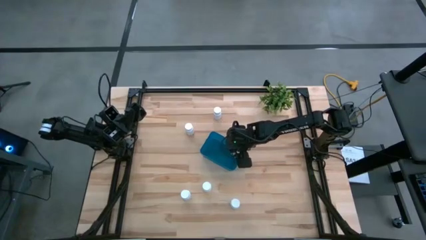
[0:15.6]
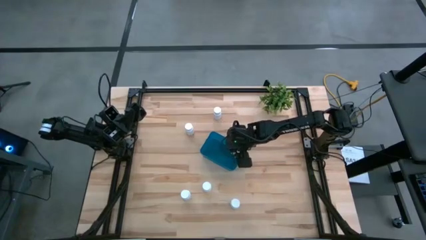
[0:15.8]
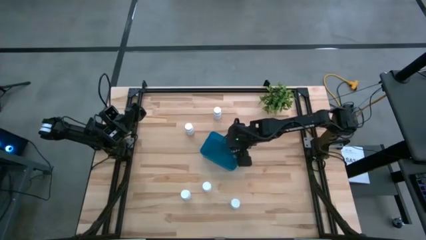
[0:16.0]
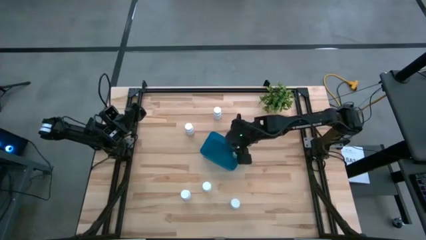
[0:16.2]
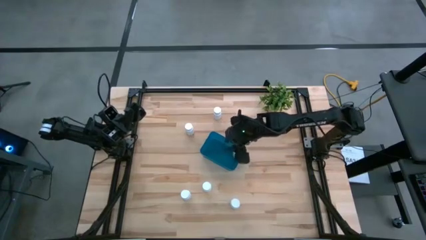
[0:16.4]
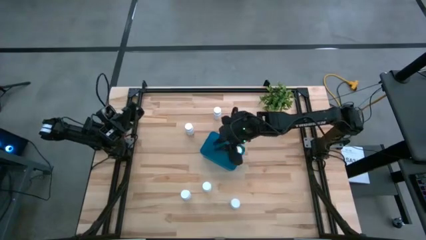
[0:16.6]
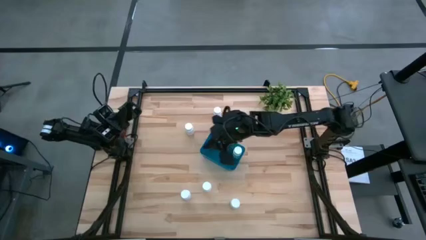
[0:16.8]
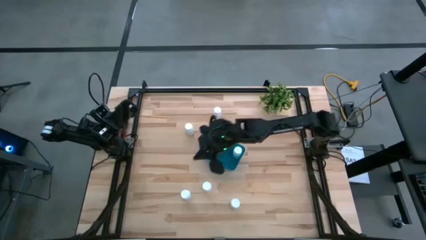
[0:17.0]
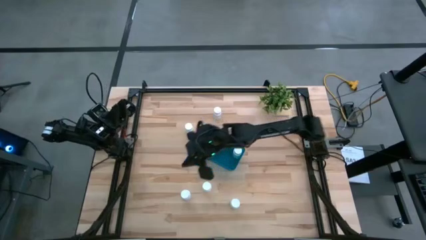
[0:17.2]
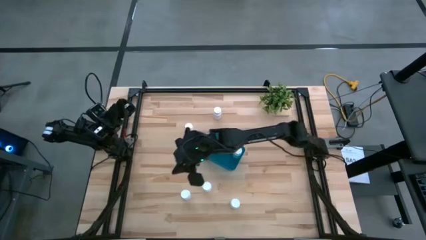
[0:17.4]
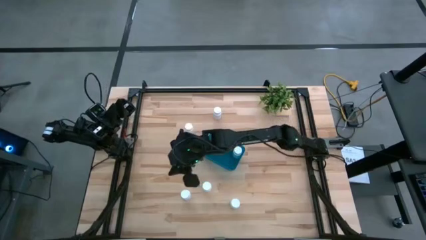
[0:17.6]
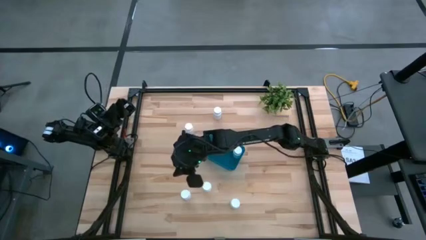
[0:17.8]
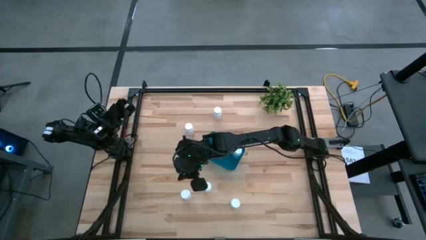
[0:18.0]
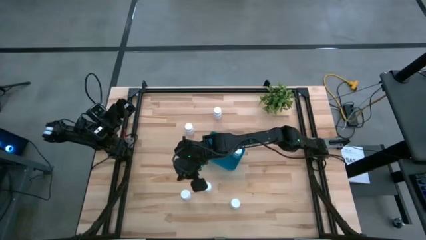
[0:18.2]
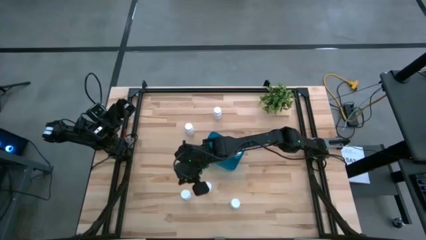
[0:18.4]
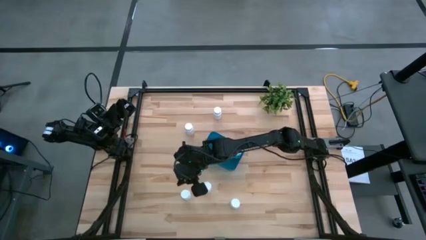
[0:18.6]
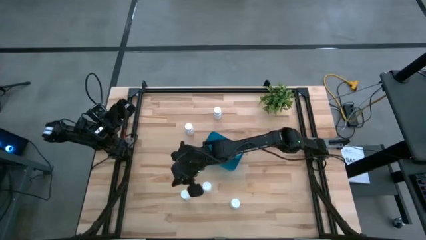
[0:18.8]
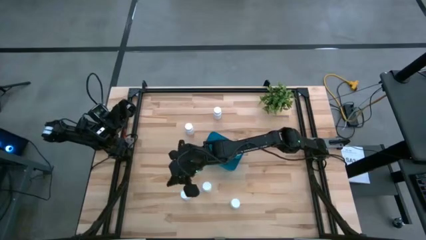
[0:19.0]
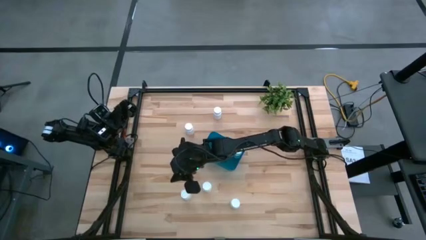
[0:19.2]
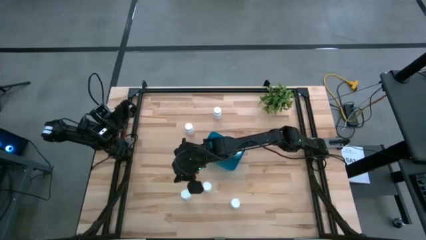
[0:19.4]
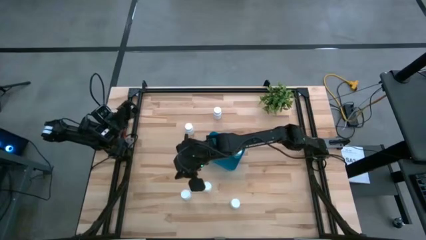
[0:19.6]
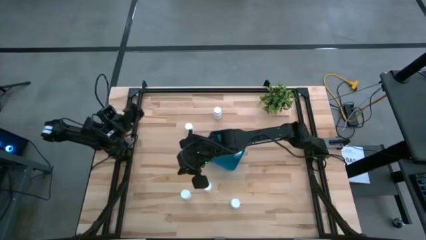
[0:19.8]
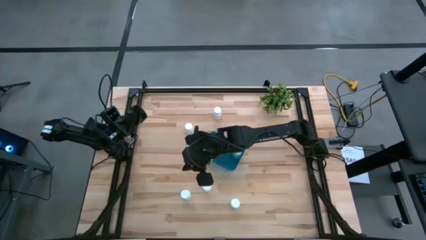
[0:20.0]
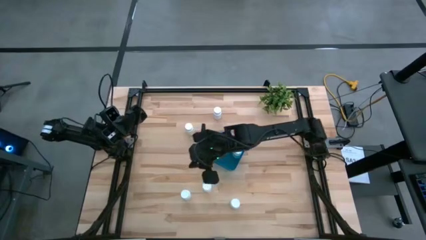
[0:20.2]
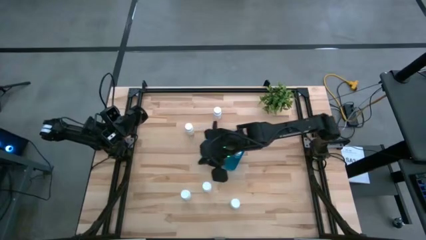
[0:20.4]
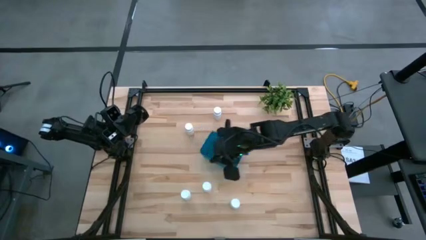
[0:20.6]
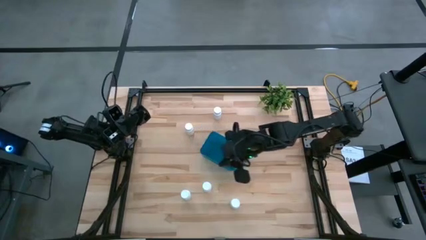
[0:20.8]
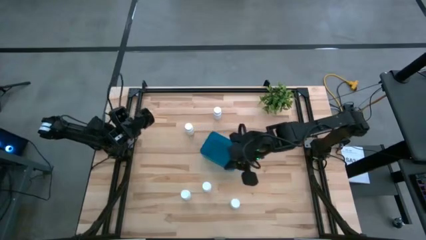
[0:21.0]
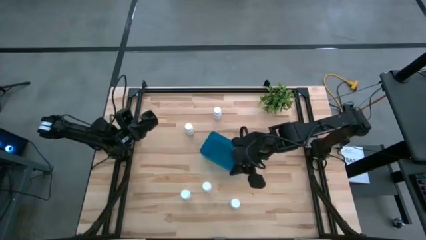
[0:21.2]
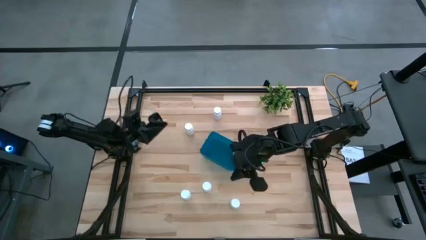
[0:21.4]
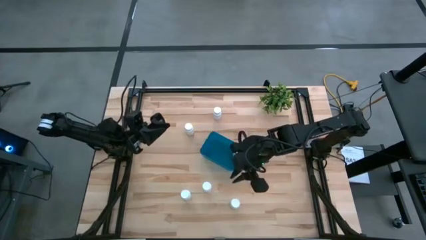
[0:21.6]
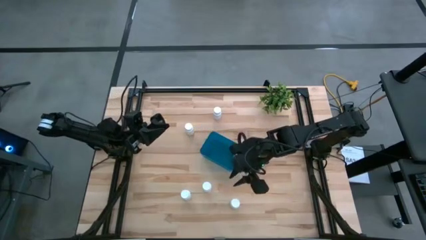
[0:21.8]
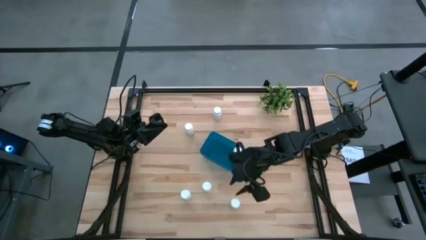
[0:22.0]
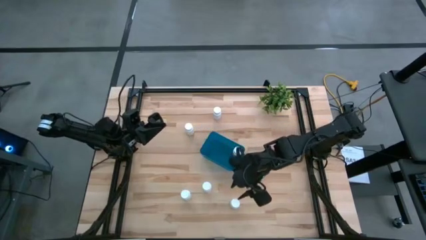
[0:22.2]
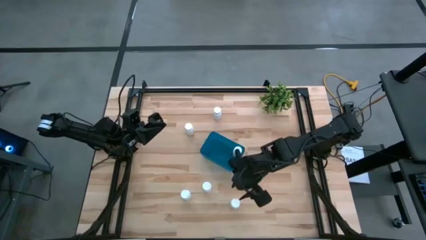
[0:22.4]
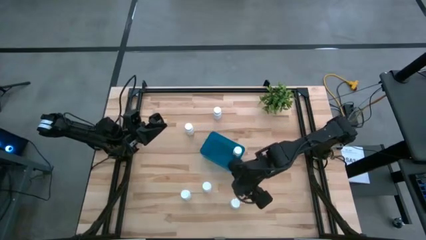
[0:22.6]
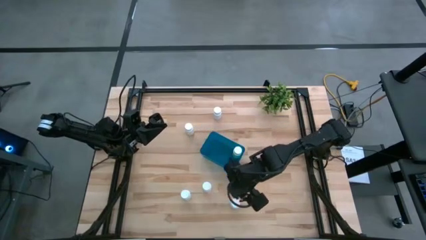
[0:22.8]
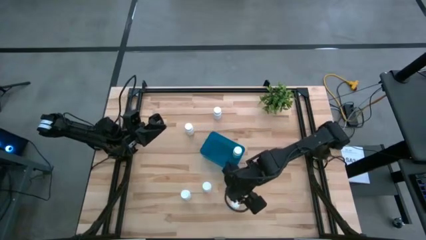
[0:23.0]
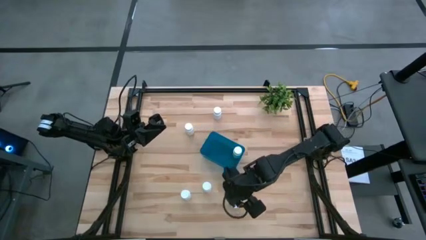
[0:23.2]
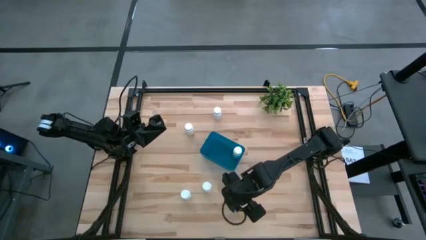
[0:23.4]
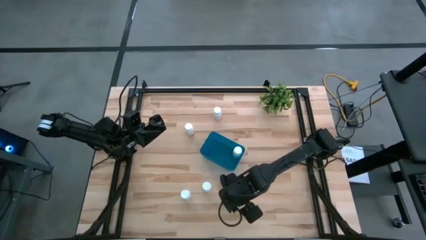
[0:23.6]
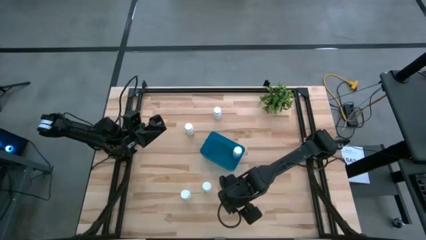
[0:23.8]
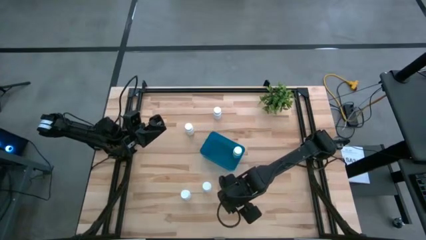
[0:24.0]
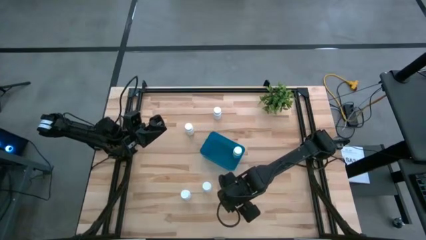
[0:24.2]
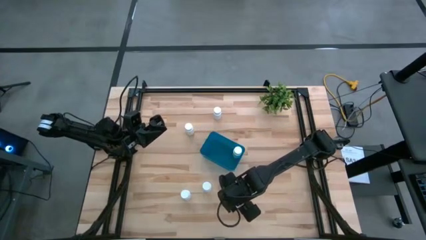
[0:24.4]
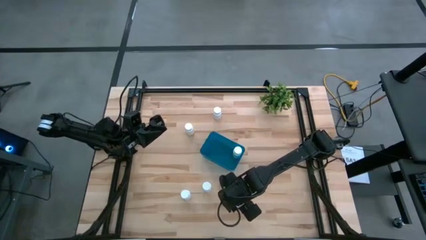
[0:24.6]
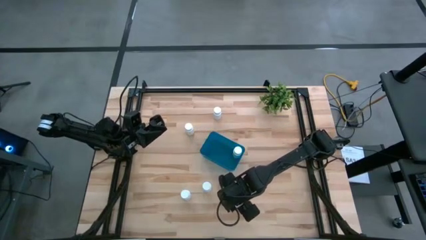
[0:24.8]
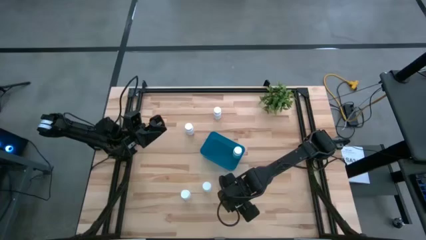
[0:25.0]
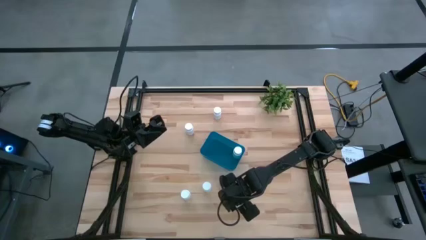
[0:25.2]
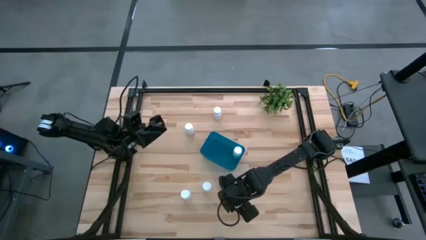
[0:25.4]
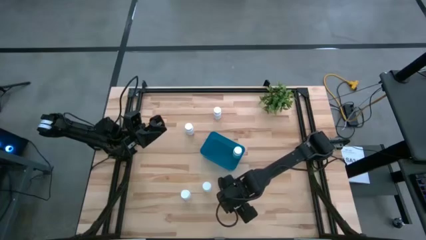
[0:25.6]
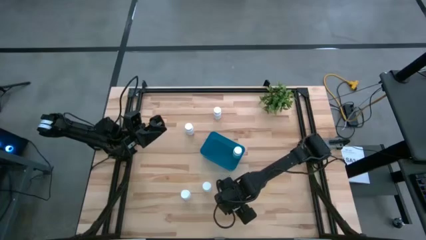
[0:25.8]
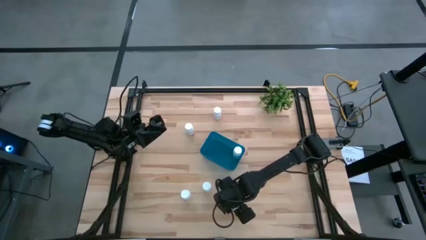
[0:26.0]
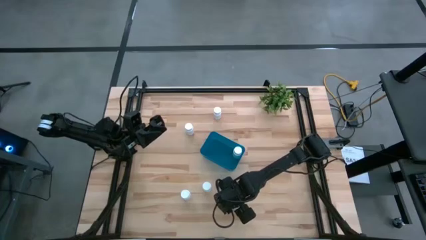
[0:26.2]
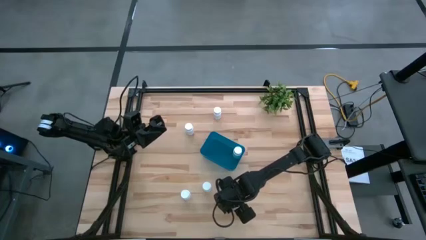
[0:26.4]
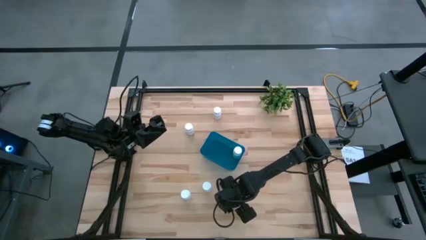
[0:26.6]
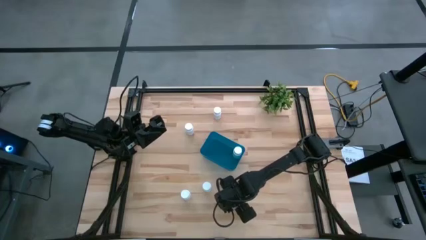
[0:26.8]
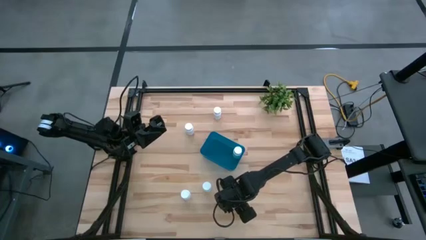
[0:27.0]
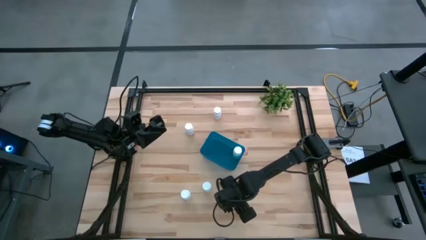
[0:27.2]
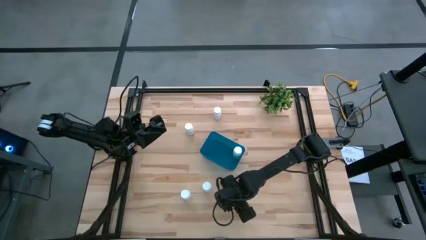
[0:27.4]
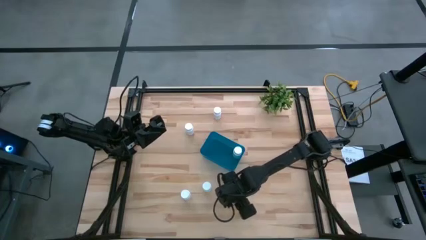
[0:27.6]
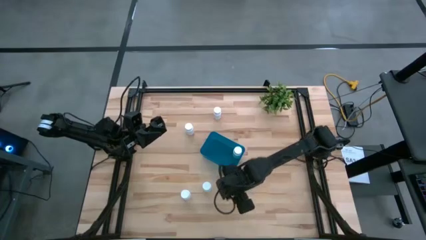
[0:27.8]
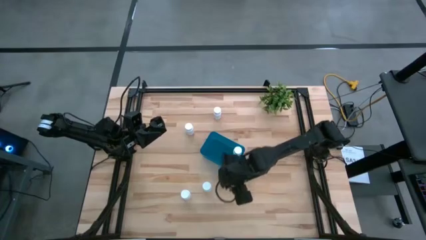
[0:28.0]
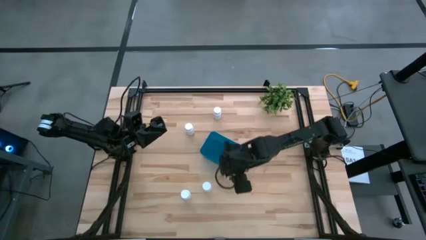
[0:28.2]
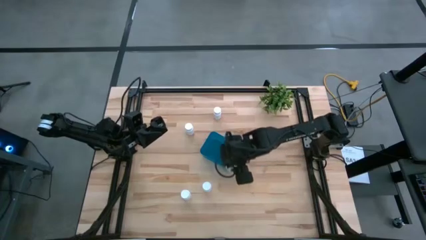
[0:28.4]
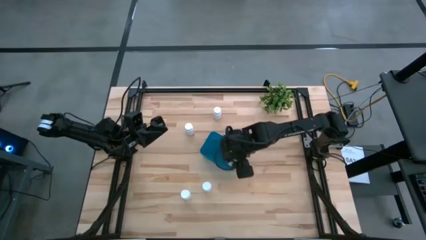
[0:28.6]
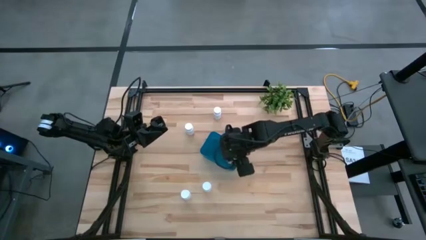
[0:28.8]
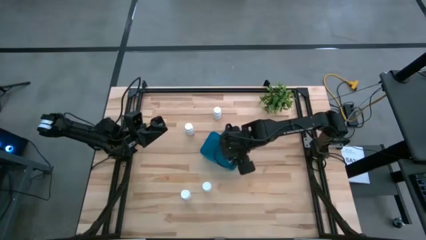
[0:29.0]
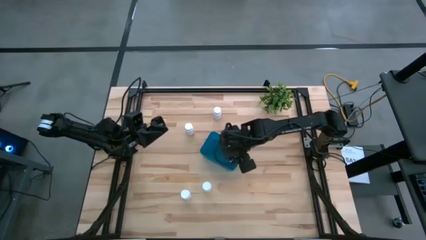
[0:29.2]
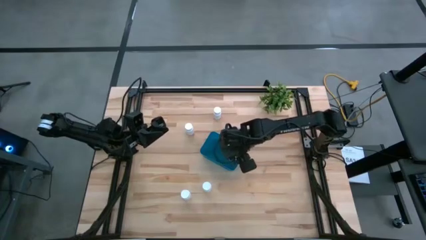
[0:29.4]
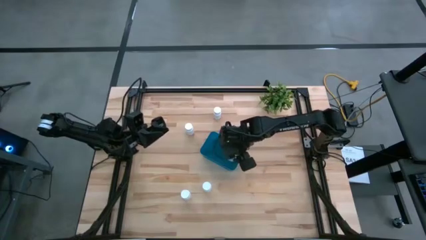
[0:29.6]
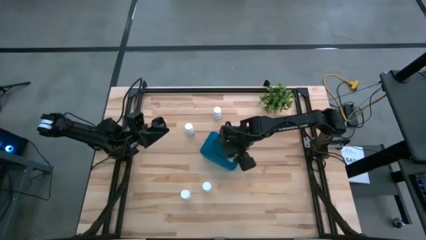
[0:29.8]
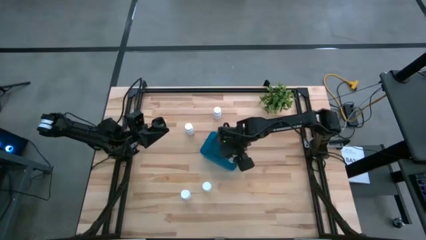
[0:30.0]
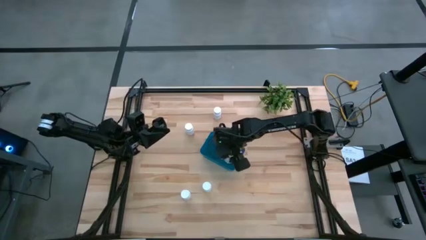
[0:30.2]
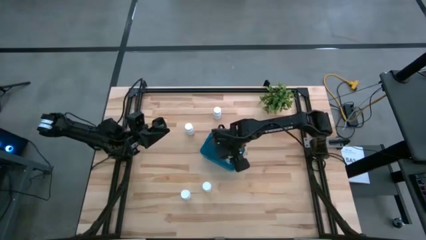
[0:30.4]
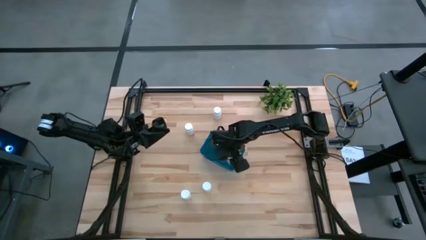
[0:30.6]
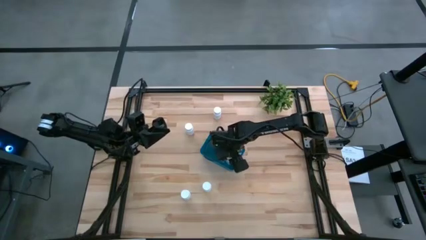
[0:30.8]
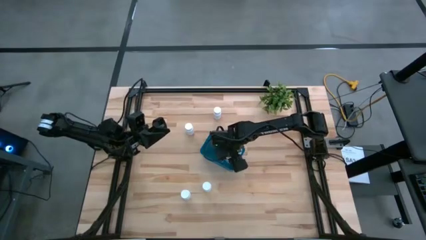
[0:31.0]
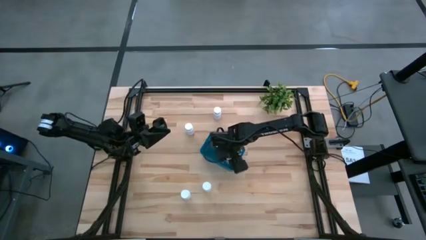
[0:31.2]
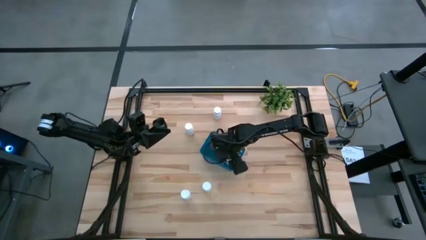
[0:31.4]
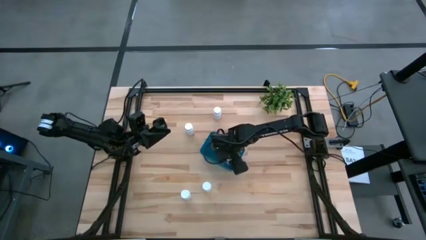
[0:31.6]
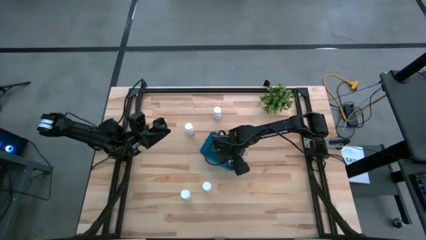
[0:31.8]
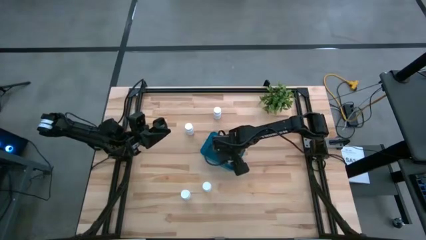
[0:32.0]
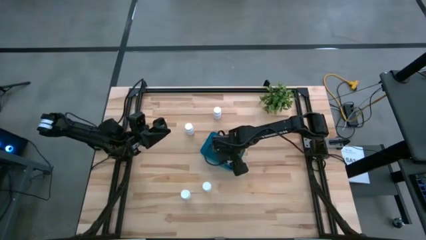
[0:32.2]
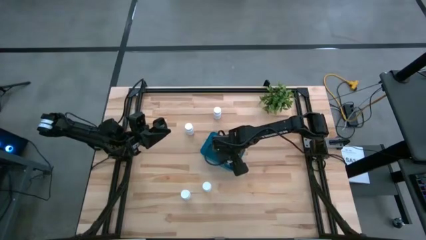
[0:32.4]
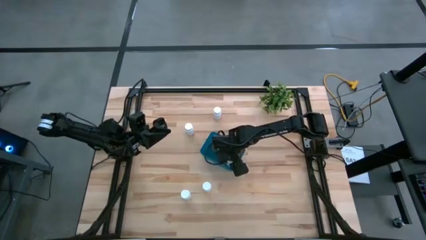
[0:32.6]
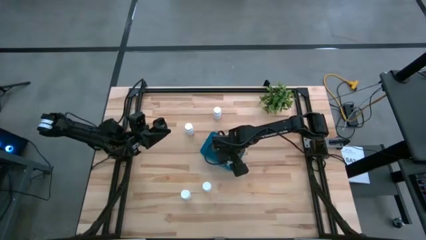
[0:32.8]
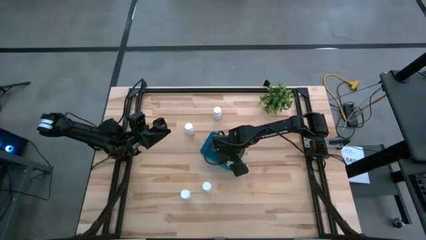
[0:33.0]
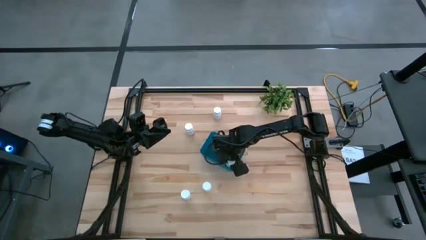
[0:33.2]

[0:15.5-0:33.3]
Task: Pick and place pill bottles into a basket
Put the white pill bottle into the blue bin
